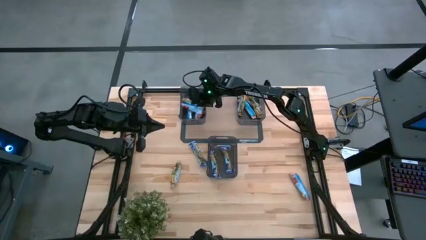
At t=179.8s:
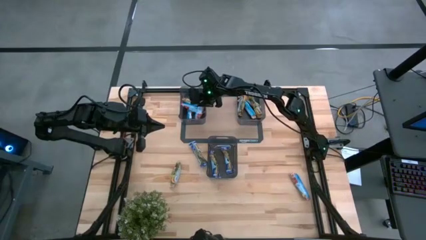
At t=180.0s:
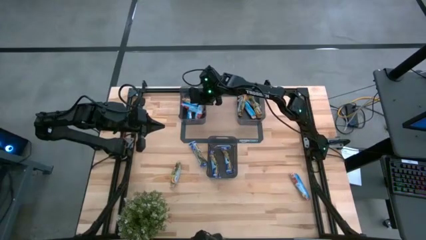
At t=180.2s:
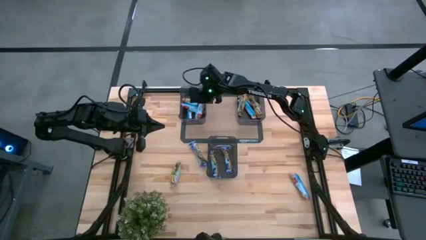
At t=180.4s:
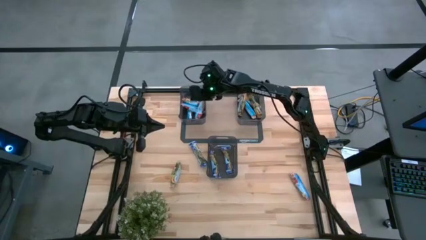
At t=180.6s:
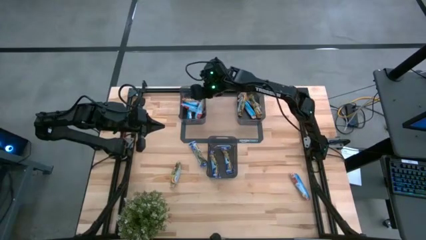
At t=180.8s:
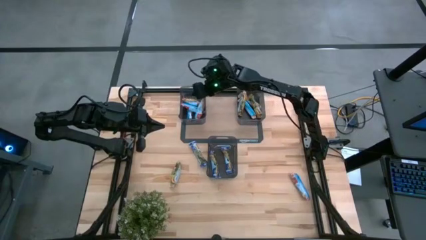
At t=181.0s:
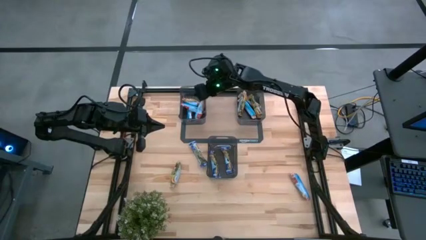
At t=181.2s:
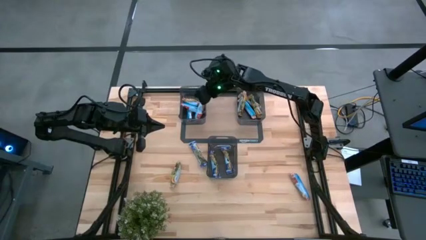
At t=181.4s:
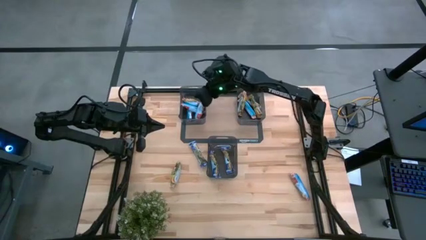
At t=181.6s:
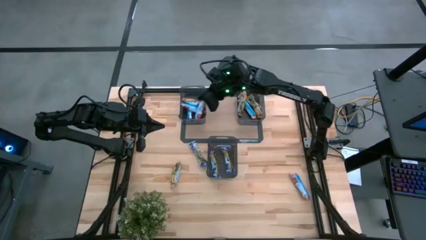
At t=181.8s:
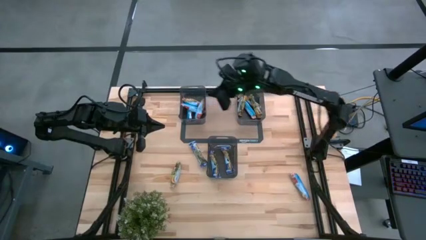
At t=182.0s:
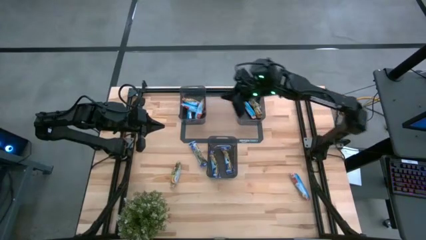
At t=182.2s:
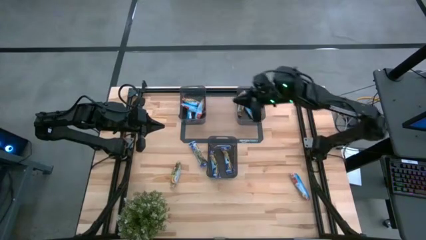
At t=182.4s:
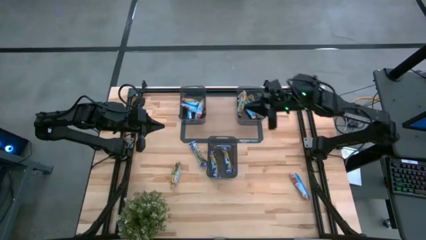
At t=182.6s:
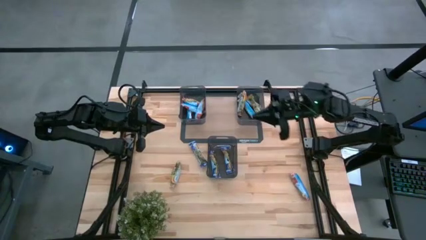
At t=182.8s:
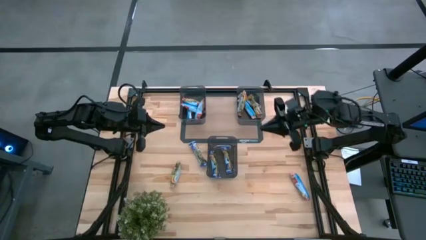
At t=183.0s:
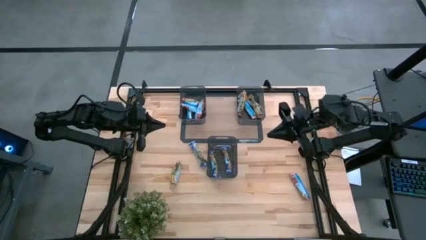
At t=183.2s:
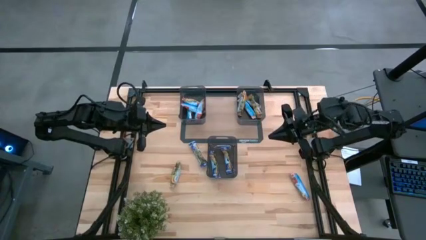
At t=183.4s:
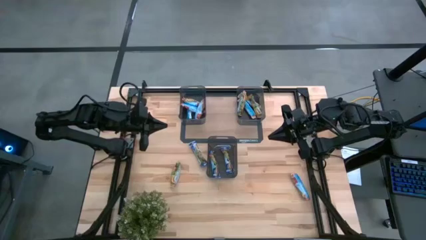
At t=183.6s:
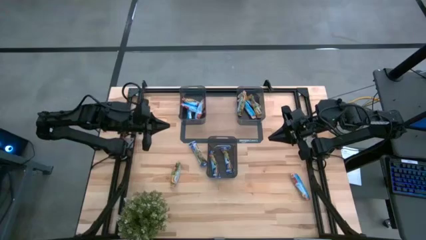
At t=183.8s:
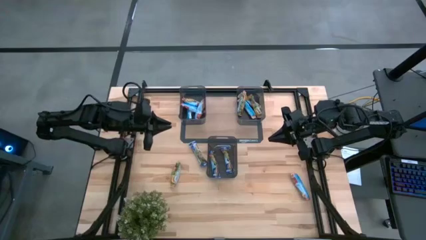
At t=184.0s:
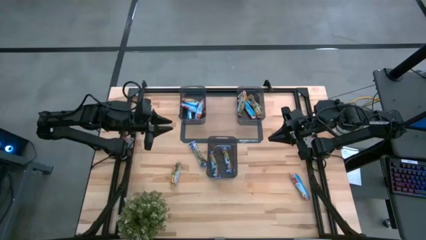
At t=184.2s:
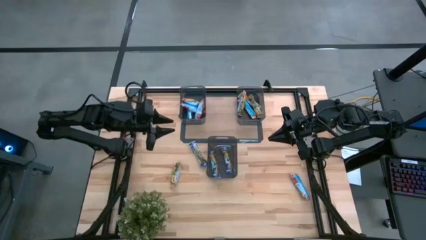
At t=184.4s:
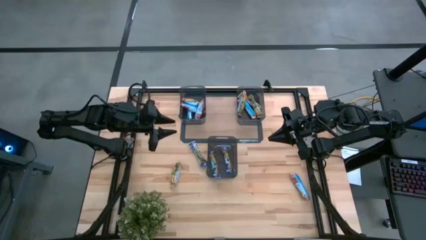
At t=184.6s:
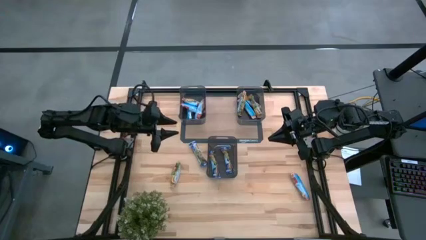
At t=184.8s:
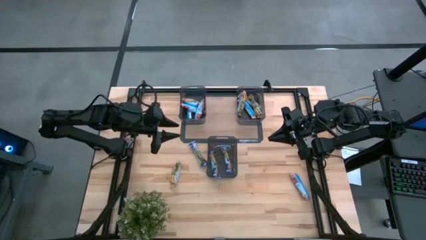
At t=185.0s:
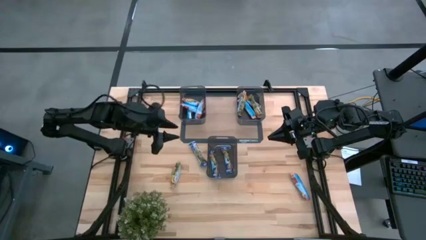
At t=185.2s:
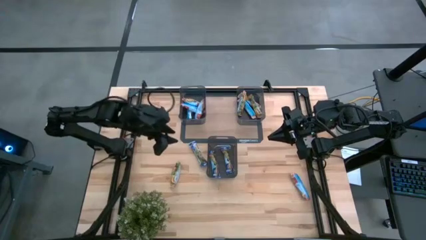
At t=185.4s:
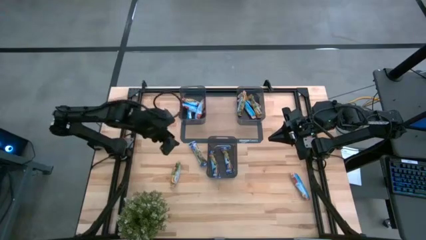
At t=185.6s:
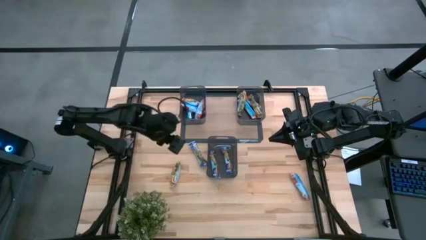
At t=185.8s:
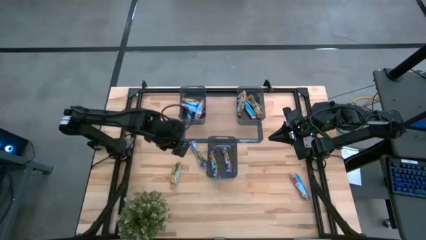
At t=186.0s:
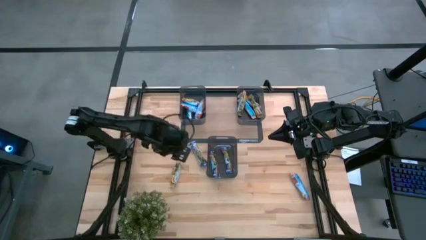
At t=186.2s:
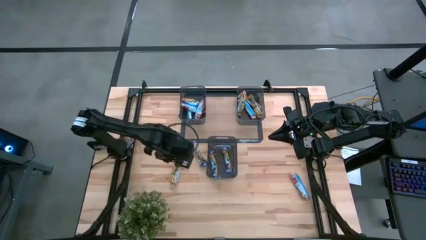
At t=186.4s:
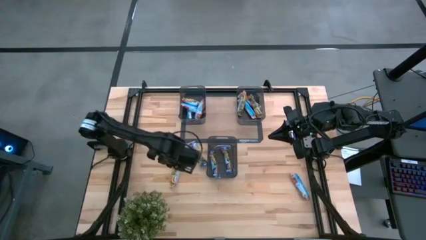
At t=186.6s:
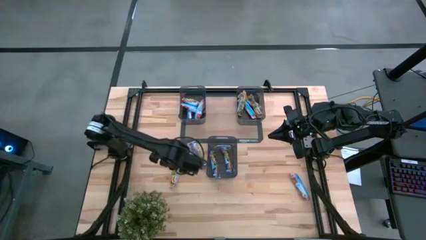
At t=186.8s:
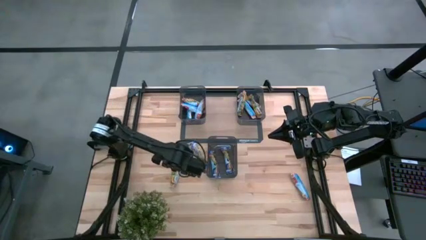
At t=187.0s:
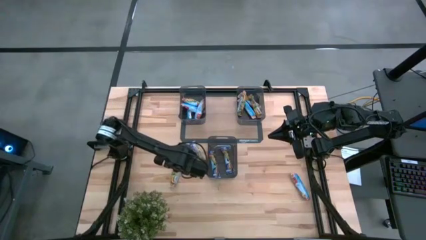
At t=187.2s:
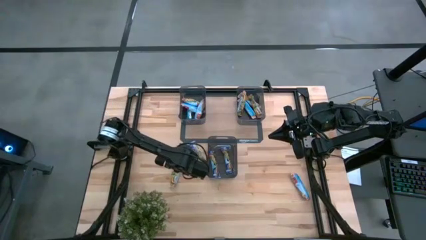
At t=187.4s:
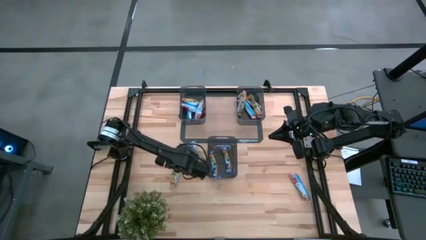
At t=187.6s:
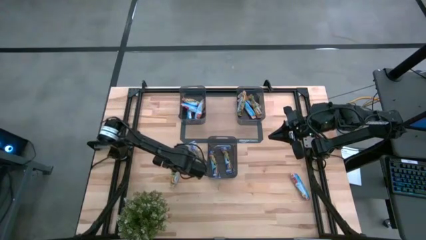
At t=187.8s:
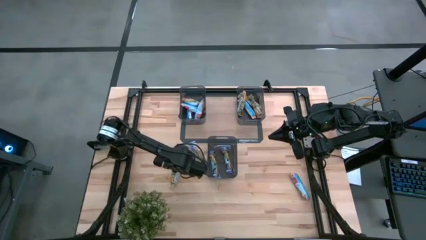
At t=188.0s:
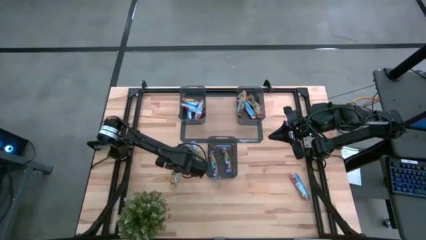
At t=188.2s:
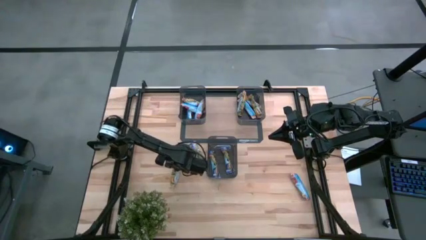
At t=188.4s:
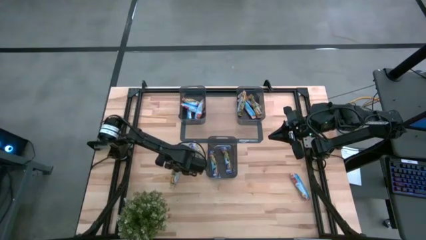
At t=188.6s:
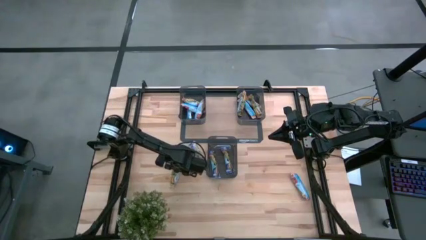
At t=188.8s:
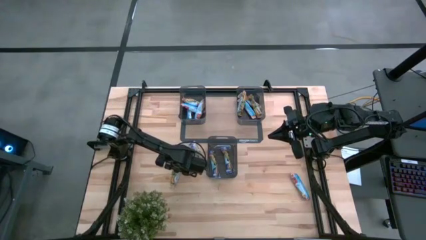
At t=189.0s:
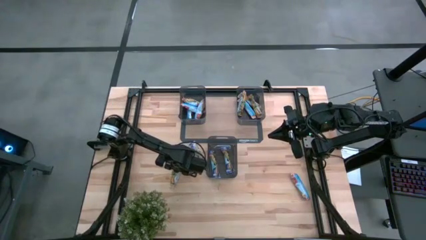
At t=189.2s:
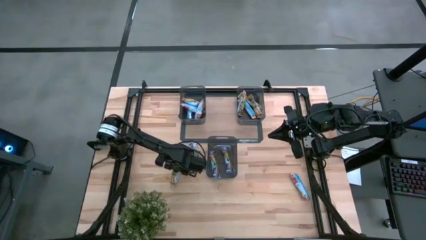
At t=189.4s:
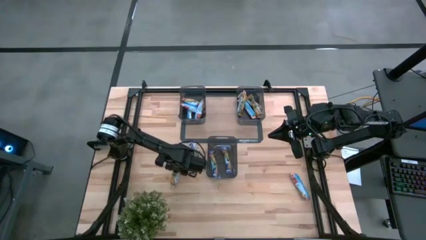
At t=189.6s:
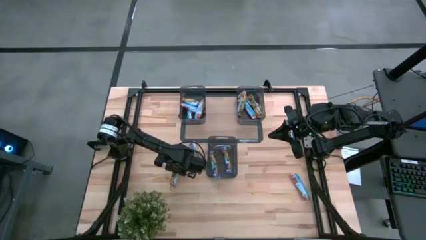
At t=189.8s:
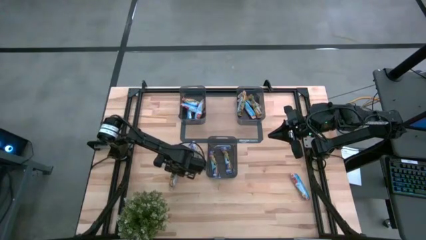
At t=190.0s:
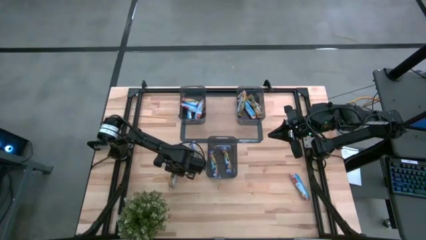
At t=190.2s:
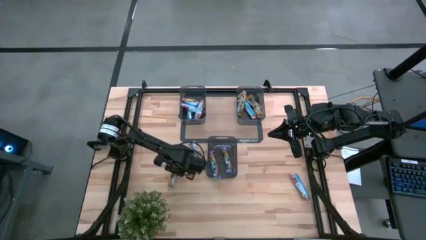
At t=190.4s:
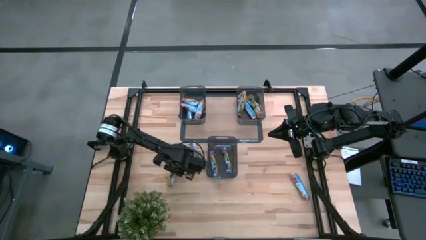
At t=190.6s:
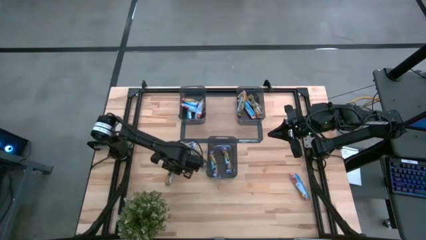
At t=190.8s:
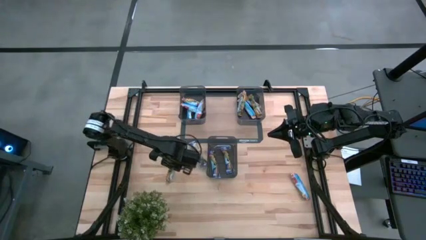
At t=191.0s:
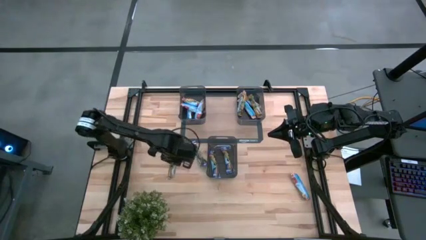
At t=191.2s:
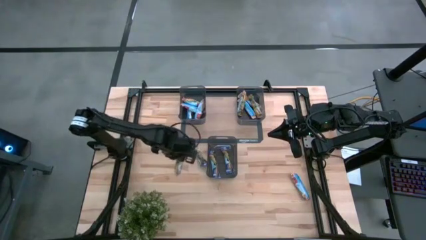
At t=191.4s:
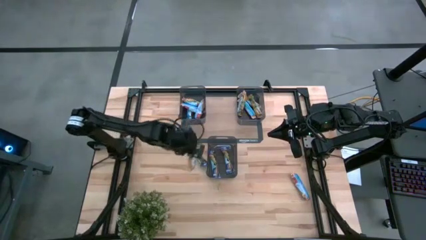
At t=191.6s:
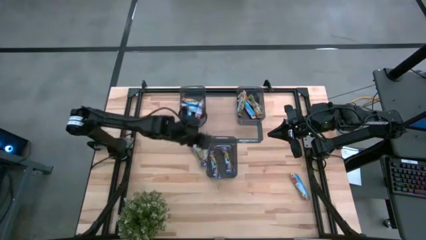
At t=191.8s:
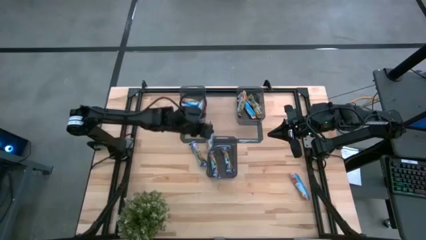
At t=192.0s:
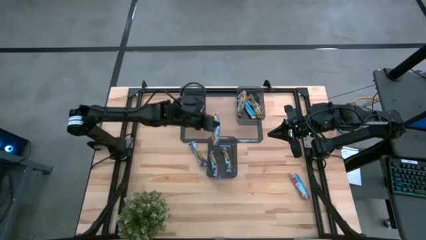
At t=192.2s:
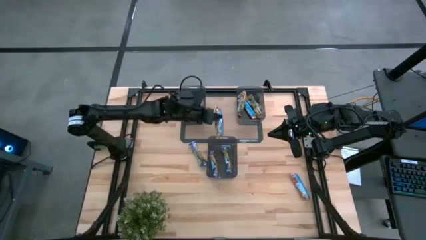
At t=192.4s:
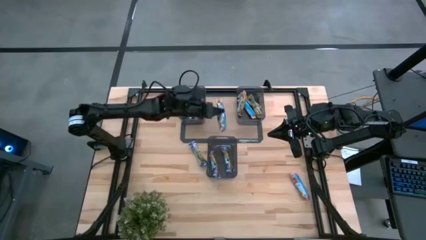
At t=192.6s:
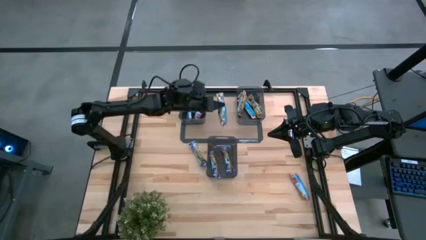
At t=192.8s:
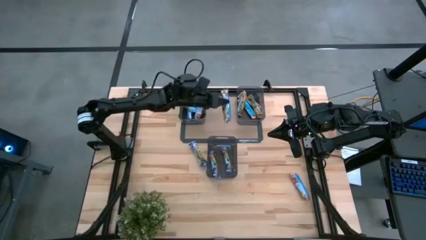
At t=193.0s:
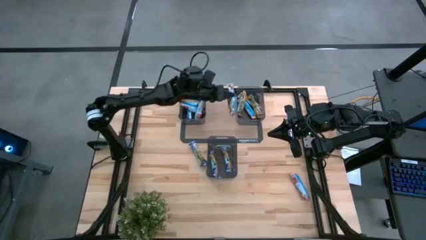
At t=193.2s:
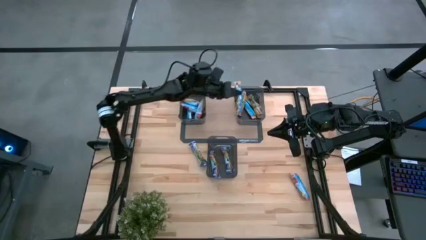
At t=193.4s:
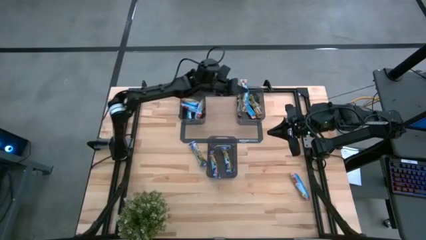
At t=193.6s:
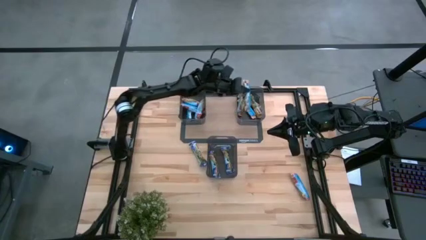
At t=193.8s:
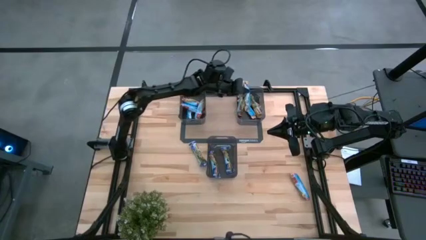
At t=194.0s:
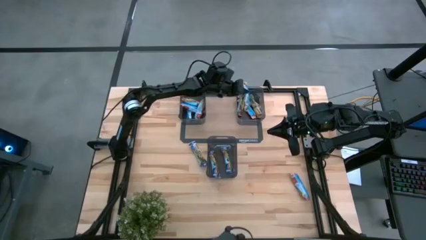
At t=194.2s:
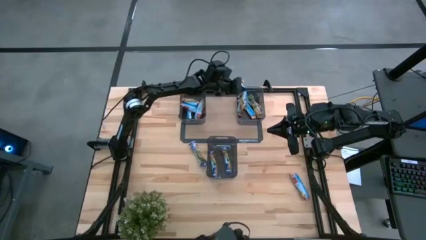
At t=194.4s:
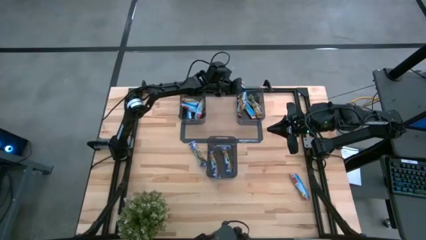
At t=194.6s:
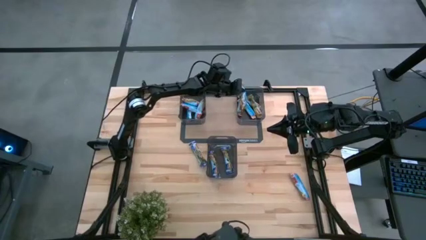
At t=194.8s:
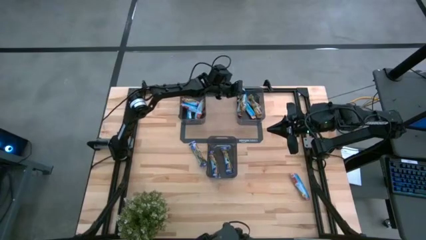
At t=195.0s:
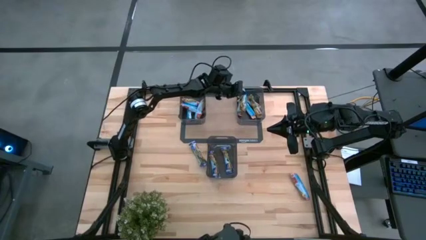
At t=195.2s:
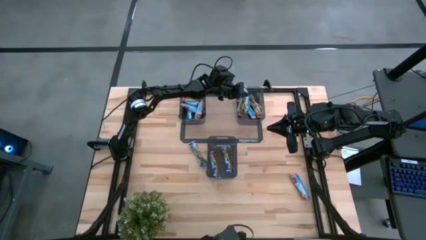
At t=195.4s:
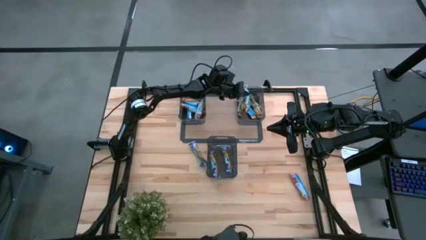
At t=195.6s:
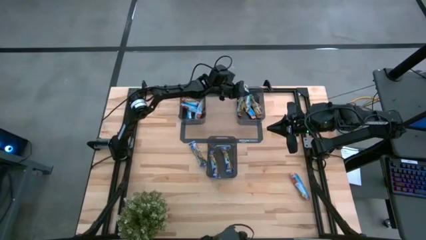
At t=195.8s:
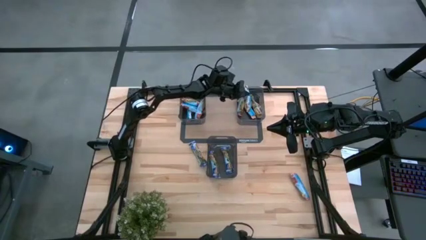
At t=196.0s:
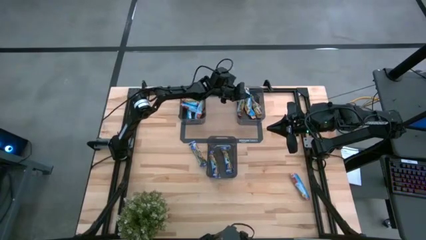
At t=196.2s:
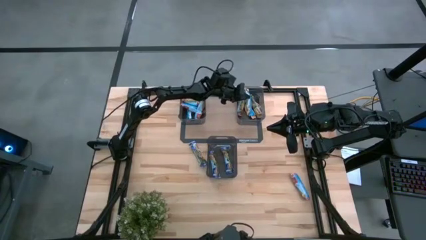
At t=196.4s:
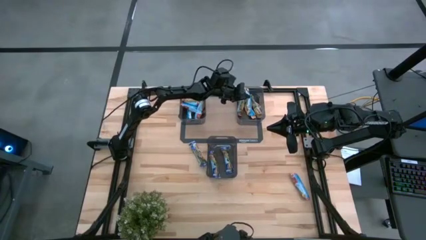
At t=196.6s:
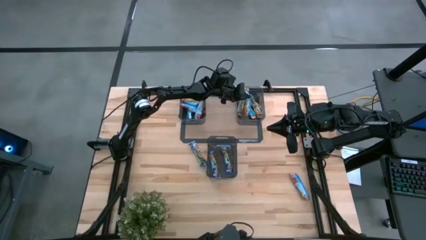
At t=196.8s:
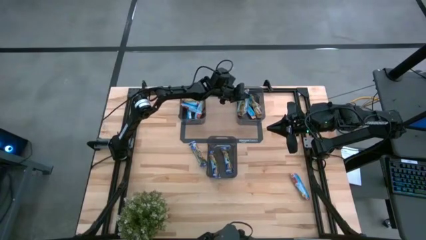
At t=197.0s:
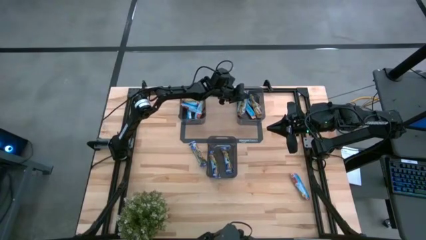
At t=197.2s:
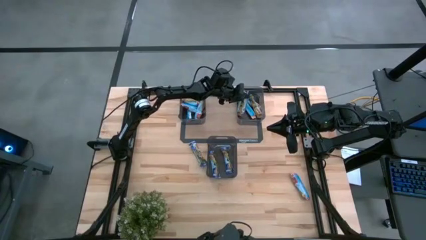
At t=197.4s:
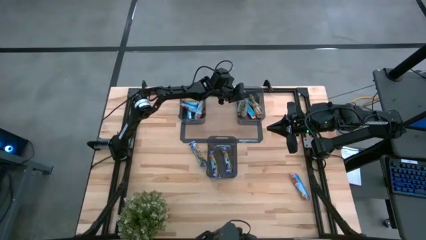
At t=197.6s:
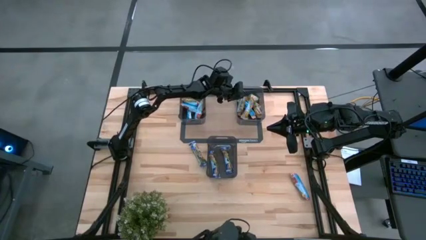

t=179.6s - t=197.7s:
Task: Pick and place Granola Bars by type
Put the yellow granola bar into the right black bin
